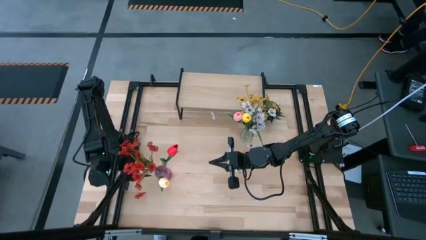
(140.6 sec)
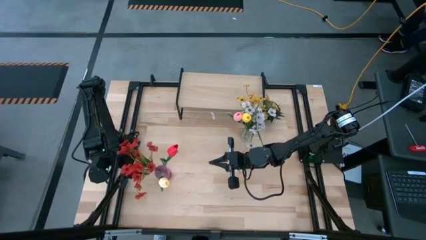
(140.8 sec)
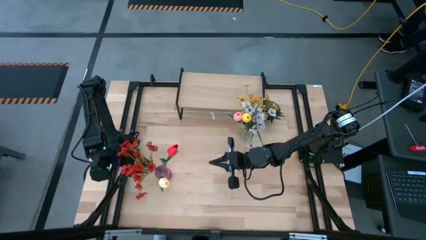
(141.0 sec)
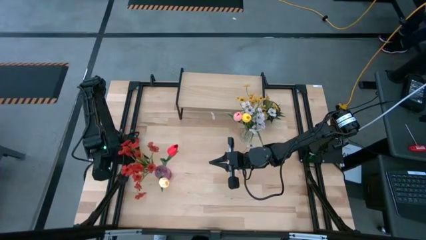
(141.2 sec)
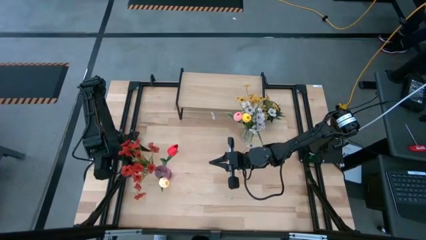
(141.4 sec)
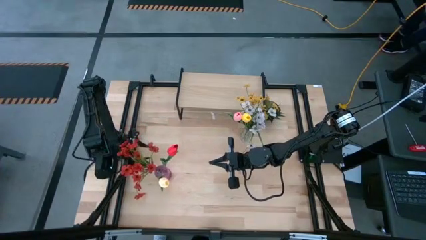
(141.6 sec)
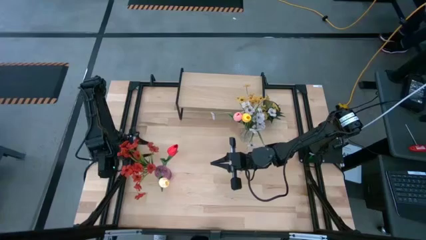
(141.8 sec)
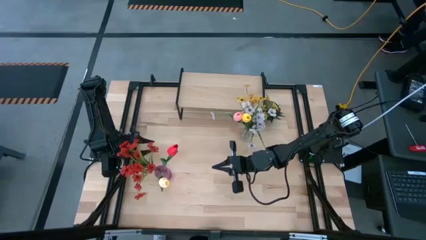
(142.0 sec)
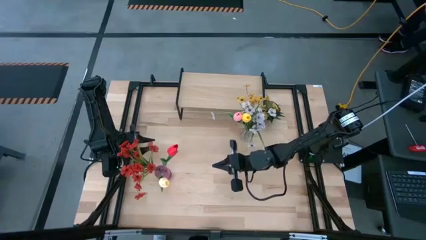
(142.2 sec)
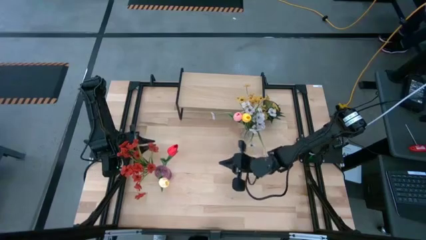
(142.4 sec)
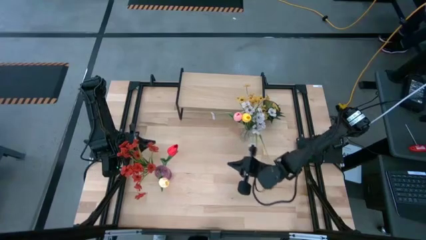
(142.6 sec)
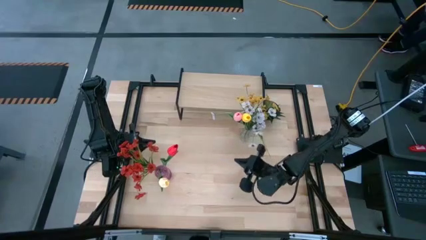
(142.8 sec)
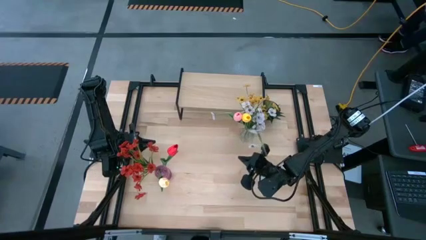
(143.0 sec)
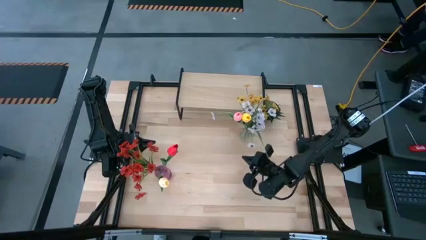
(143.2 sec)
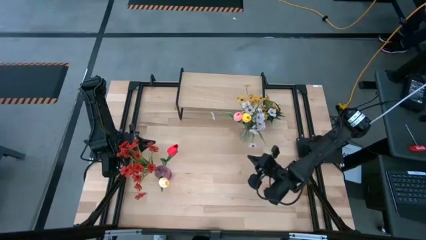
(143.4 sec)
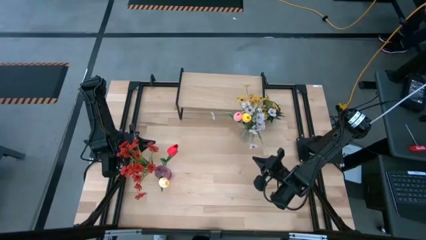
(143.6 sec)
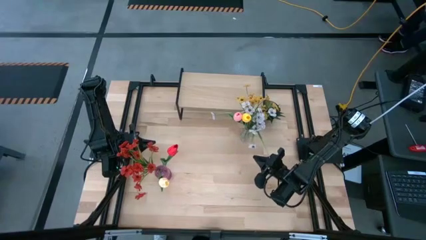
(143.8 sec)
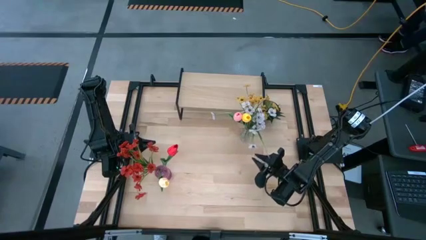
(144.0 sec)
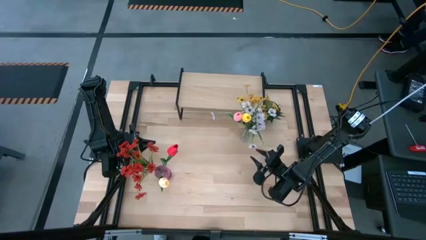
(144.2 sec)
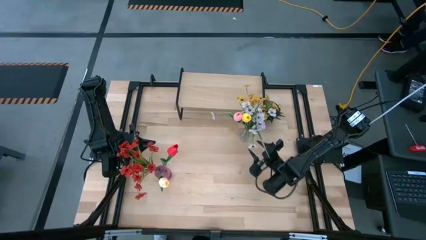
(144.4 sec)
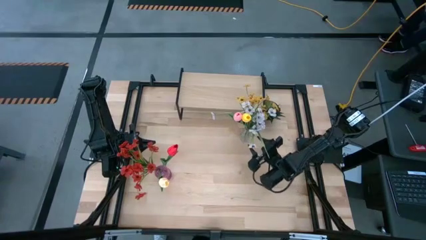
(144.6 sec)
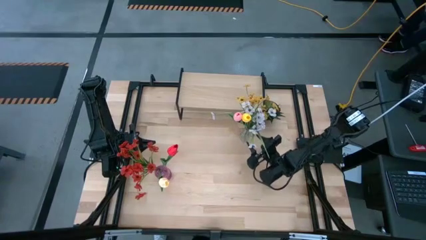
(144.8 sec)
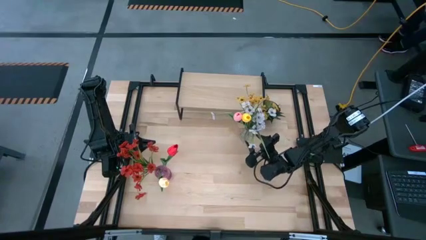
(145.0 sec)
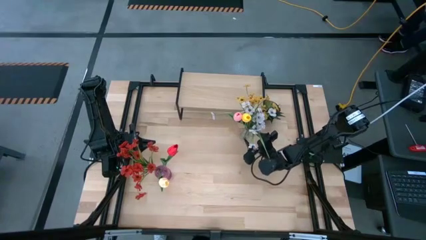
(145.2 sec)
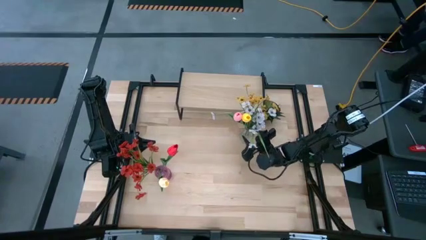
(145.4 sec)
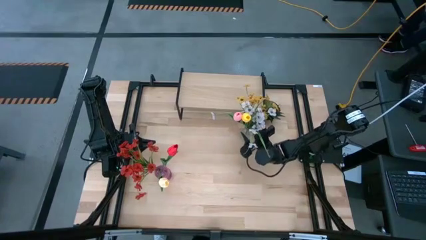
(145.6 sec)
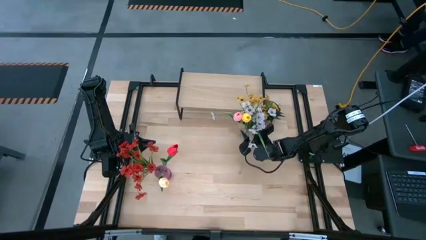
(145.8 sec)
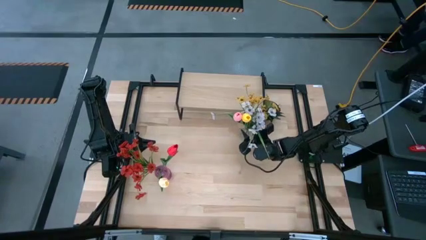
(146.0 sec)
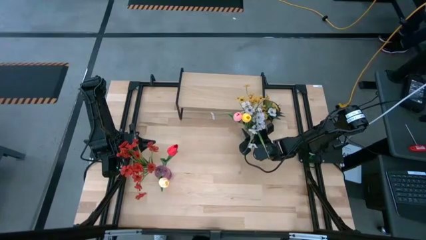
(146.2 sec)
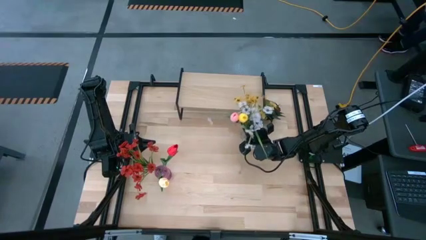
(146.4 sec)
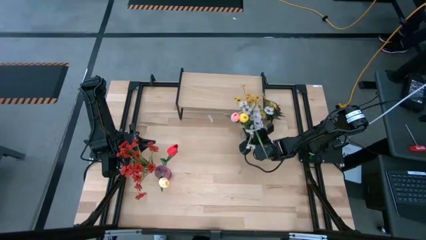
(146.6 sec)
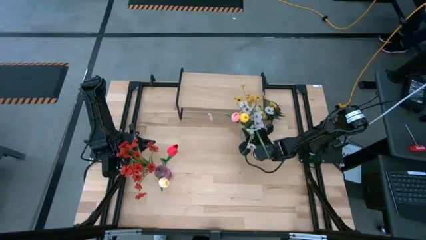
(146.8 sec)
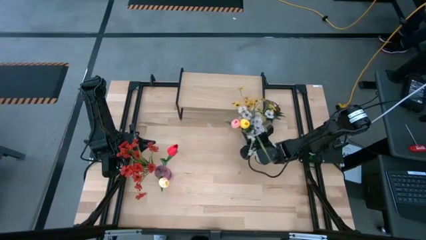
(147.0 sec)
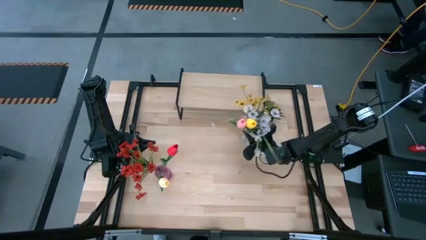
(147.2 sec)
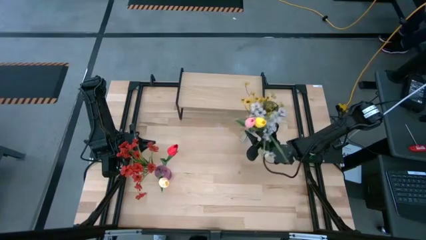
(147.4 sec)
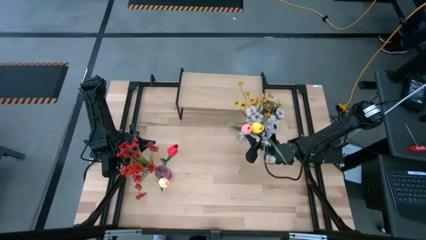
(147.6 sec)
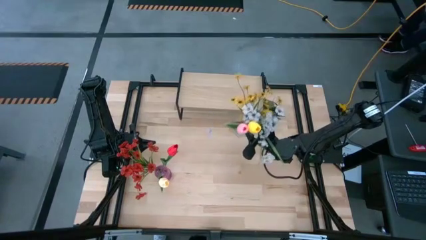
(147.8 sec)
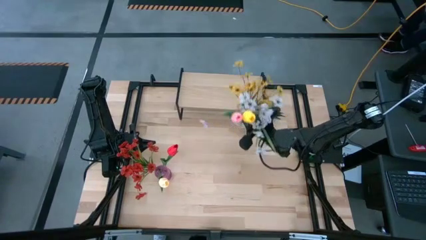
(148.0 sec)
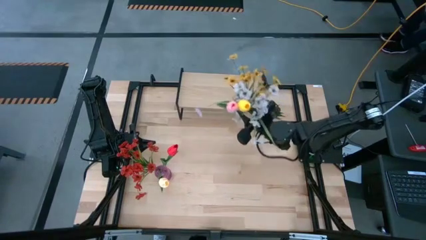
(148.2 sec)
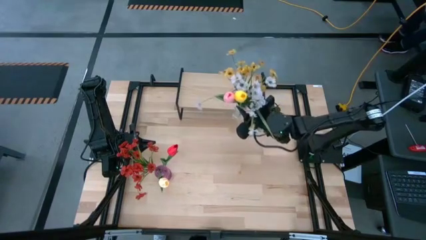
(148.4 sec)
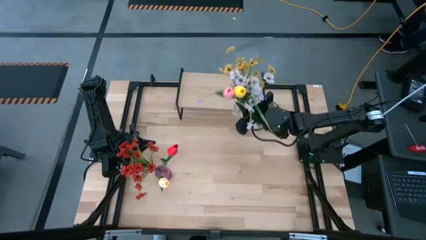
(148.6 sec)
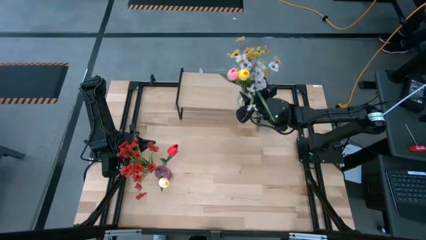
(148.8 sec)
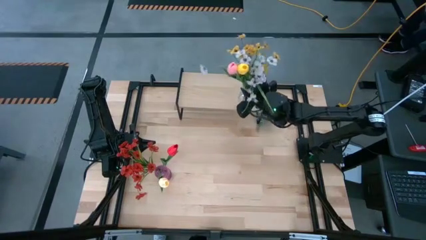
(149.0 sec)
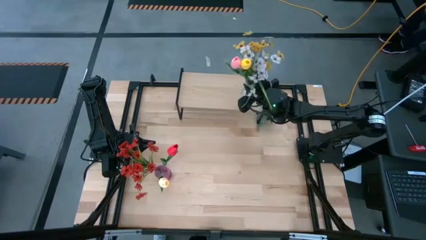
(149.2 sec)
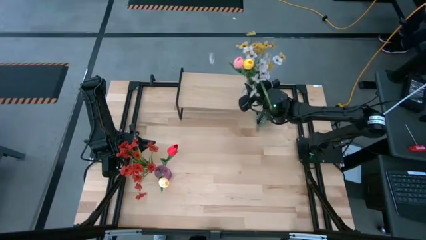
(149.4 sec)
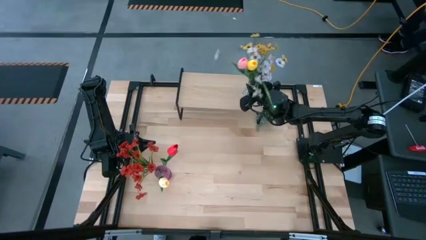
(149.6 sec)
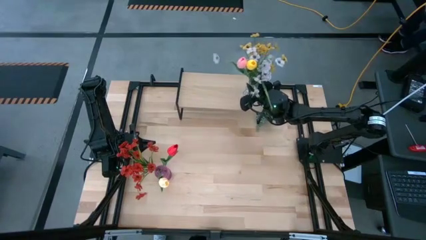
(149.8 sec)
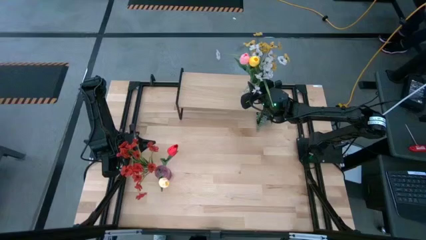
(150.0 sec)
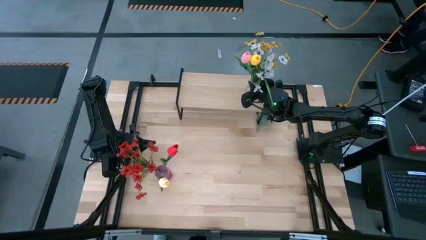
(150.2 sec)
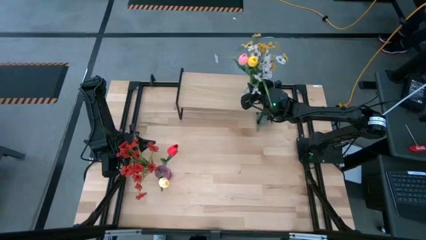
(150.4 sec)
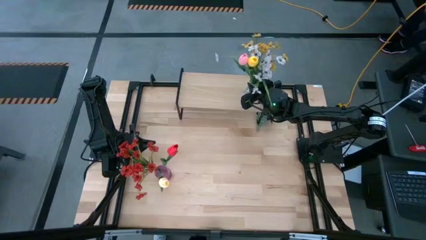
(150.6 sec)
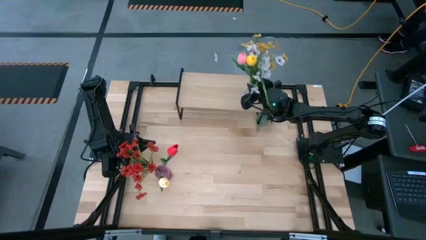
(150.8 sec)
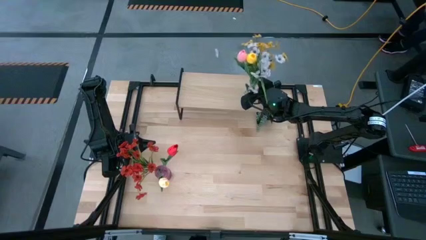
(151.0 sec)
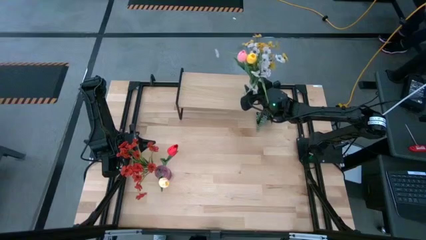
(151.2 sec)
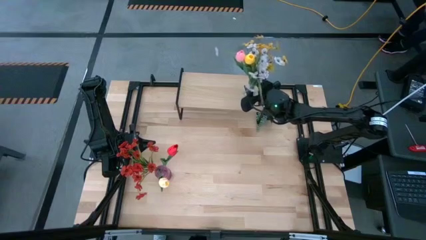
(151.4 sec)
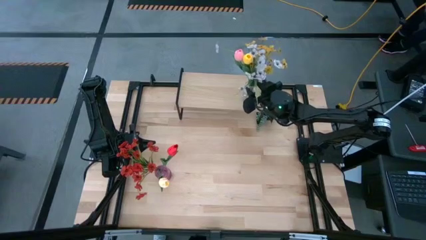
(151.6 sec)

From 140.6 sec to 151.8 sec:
Task: Pick and place flowers into a vace then onto a shelf
Put the transparent vase with flowers on the shelf

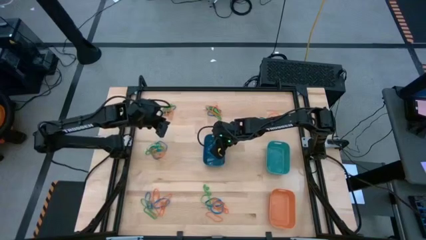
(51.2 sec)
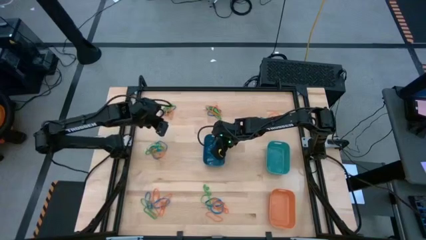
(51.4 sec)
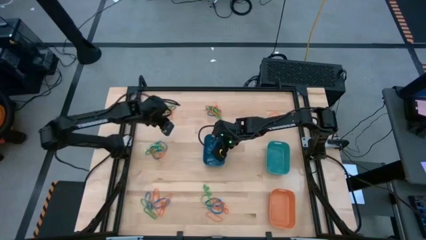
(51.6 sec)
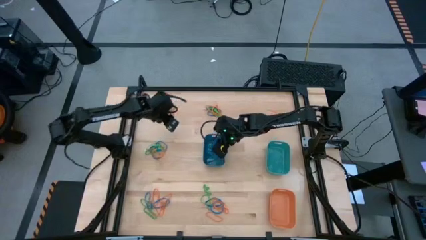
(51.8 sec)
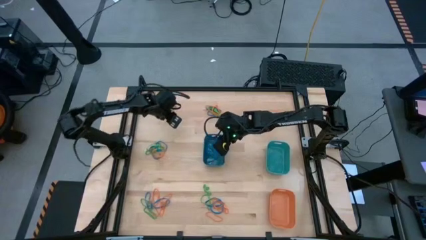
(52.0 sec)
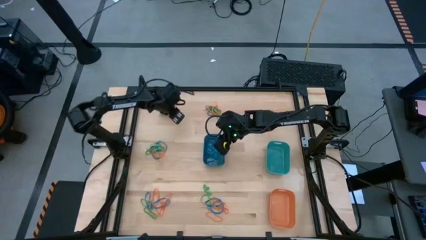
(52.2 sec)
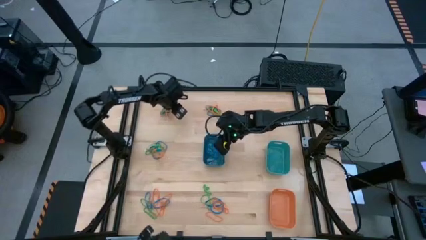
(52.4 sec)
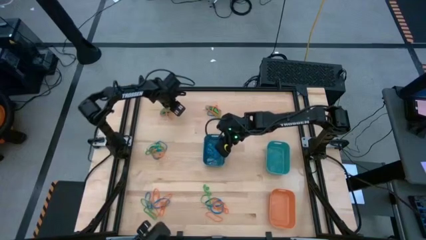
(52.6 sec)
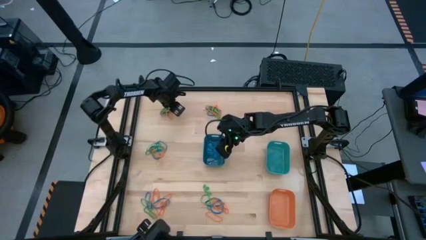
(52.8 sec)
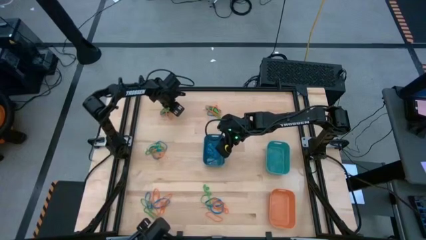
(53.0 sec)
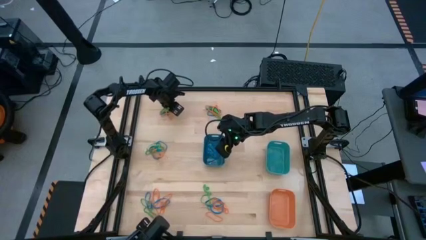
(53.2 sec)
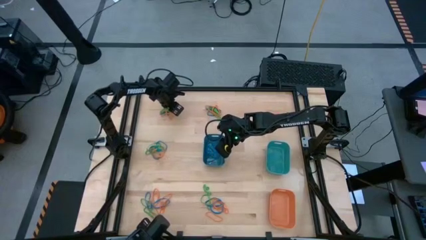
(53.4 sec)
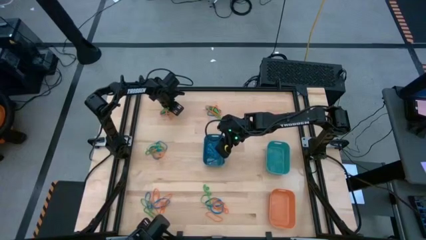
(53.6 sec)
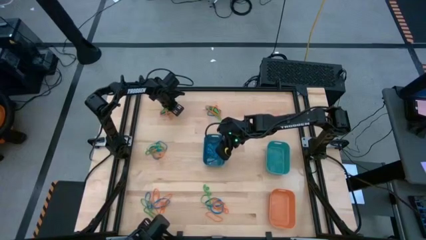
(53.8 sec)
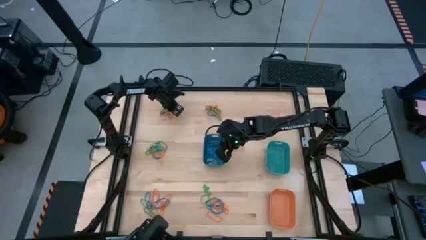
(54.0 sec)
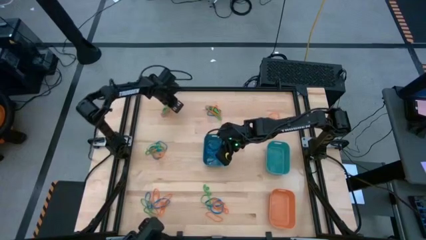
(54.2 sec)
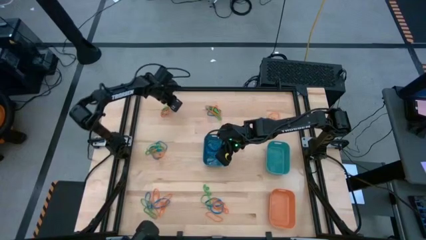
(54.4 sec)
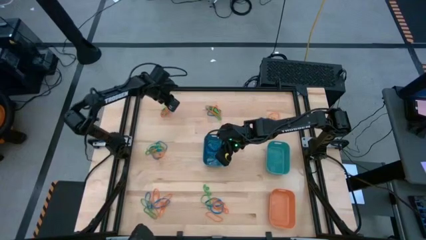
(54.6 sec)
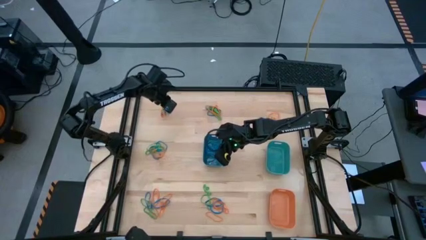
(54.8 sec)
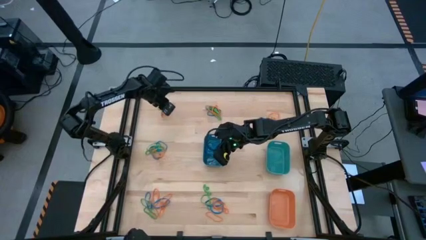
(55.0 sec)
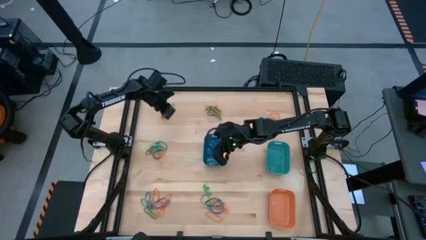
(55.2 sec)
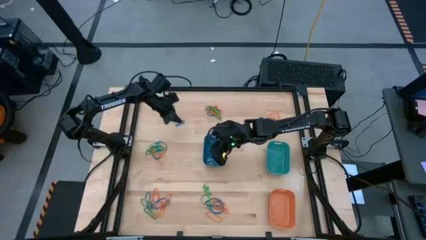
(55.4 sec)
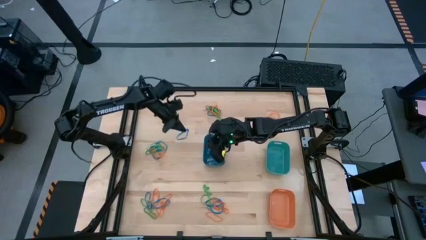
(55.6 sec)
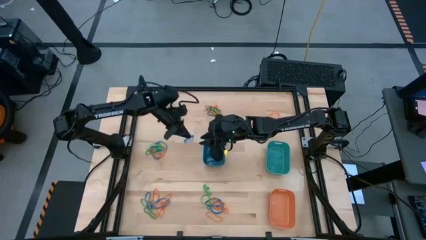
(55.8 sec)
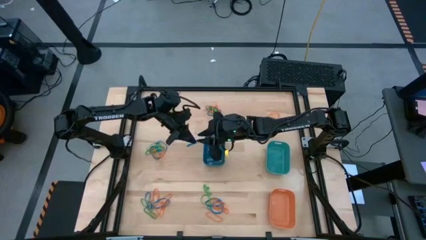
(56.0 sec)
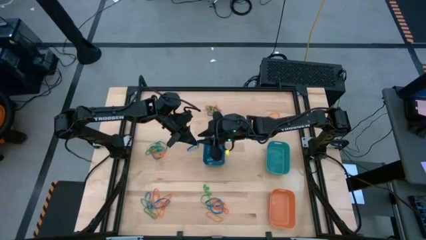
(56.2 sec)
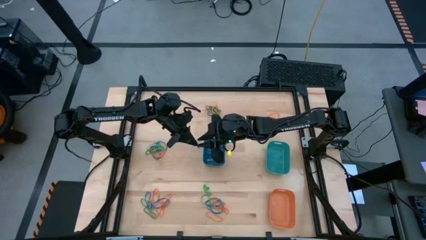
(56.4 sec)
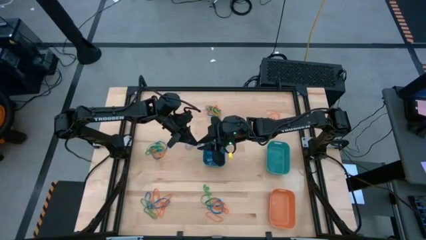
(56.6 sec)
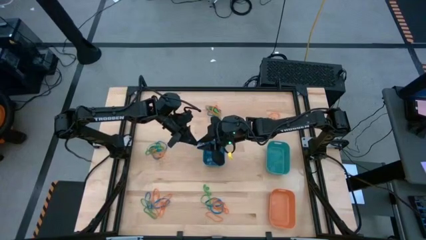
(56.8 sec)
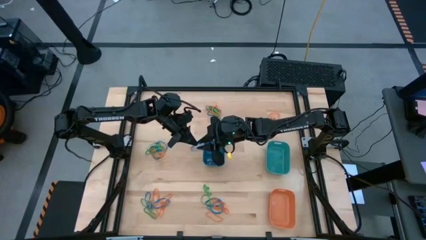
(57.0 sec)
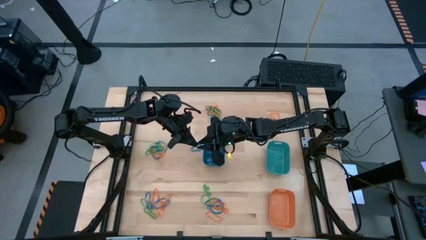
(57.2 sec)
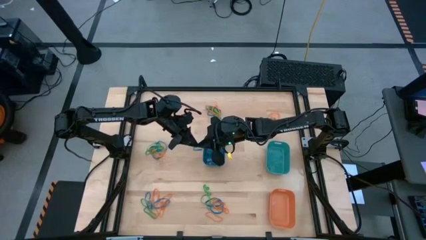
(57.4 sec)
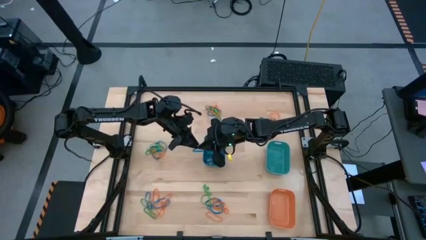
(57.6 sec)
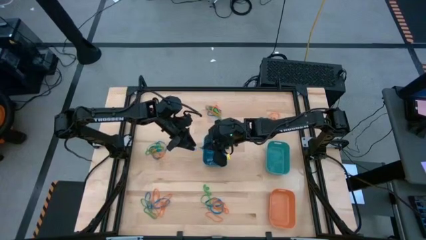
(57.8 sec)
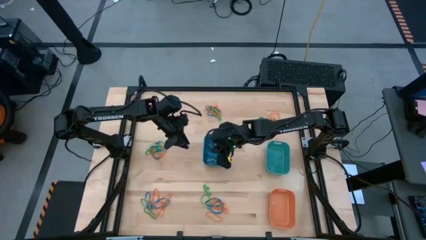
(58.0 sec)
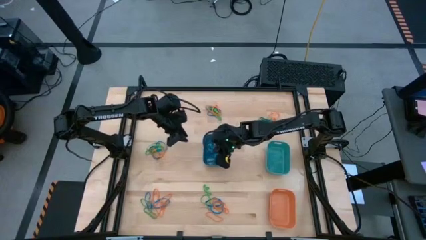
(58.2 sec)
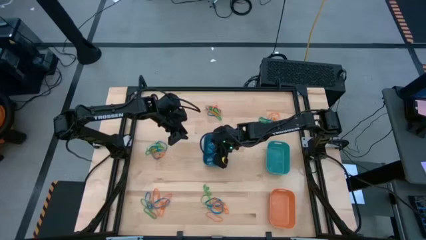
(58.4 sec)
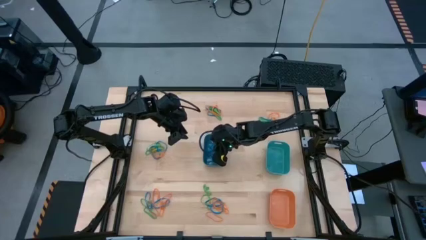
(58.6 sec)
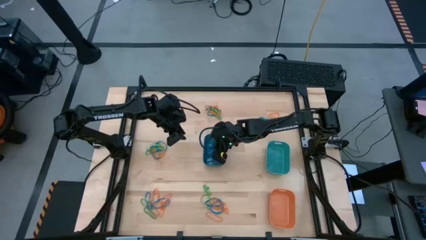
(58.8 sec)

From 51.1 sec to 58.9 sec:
Task: Sort rubber bands into baskets
Put the blue rubberband into the blue bin
